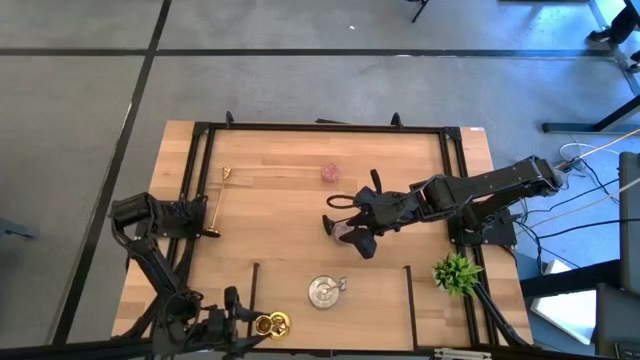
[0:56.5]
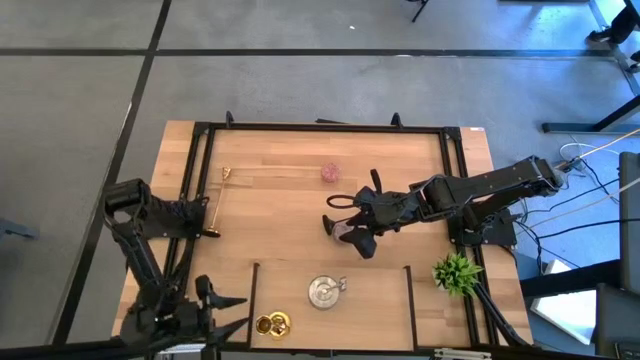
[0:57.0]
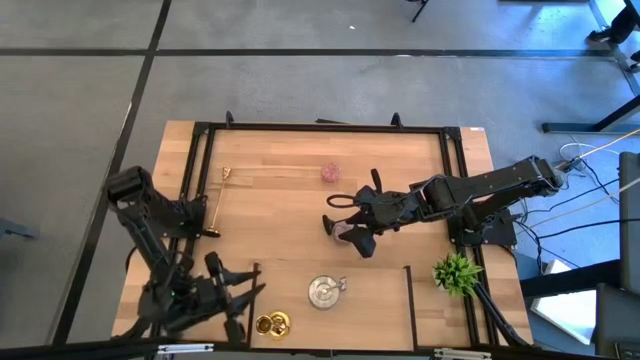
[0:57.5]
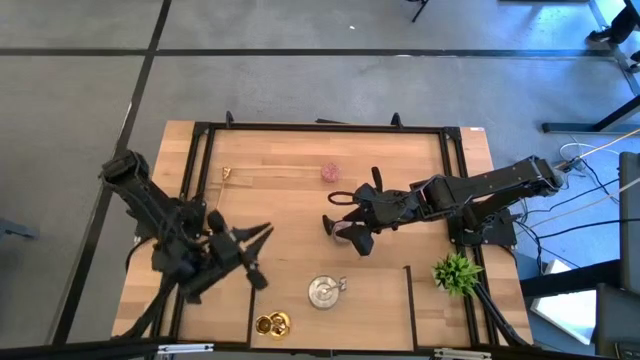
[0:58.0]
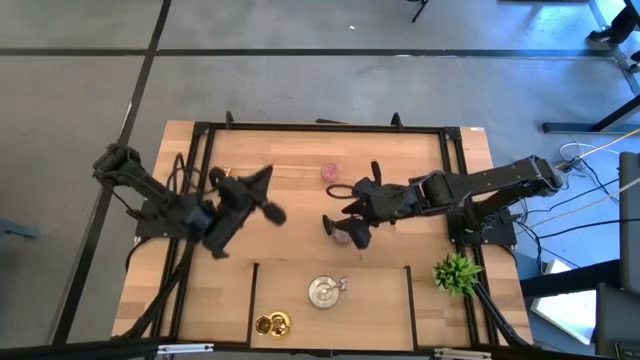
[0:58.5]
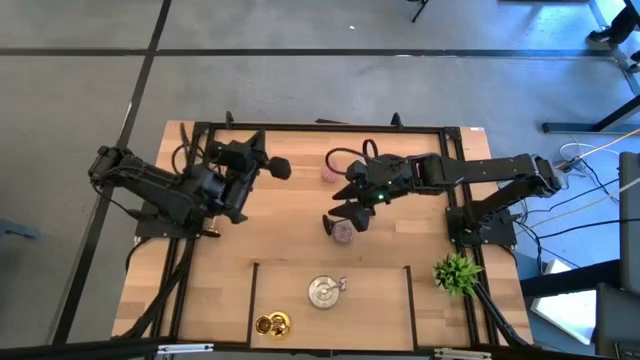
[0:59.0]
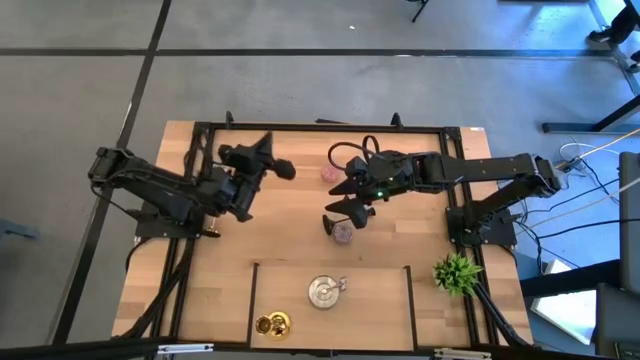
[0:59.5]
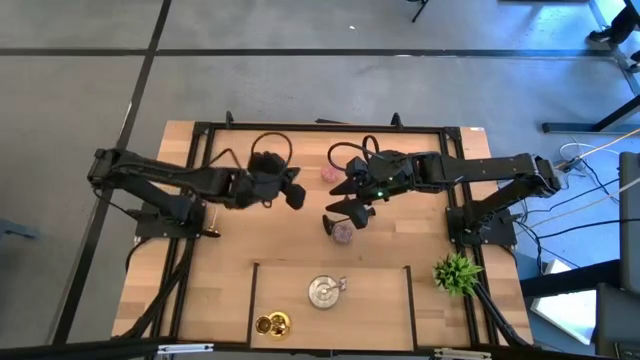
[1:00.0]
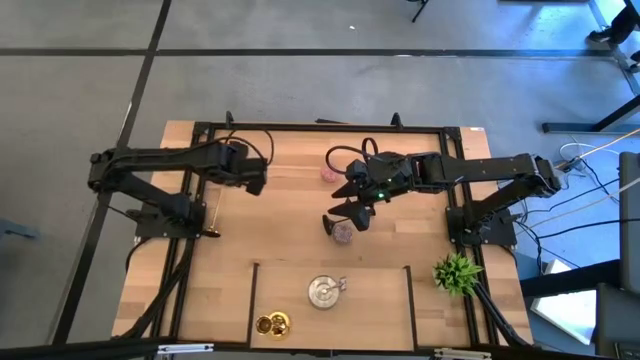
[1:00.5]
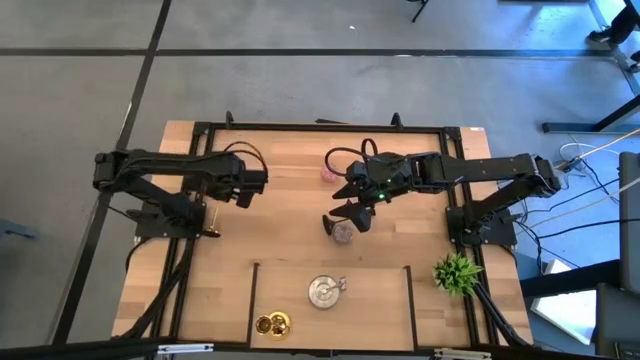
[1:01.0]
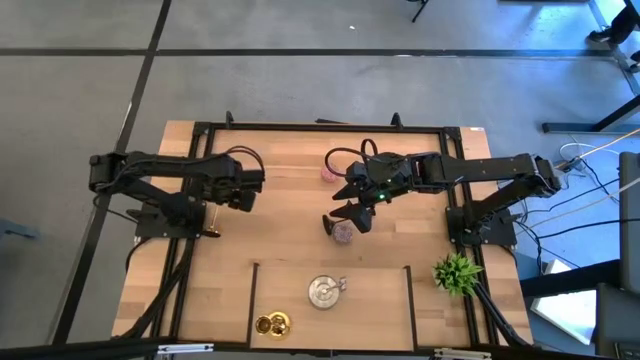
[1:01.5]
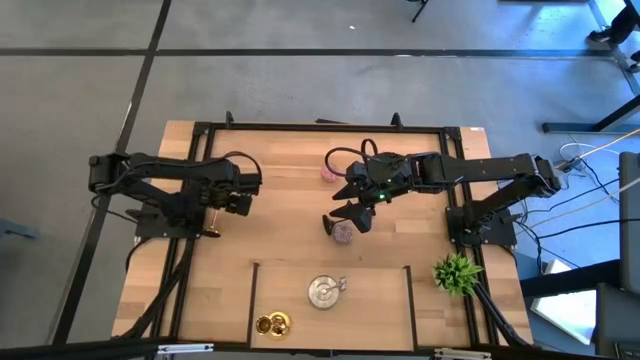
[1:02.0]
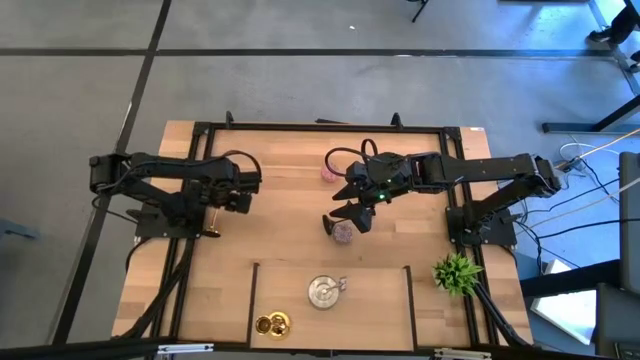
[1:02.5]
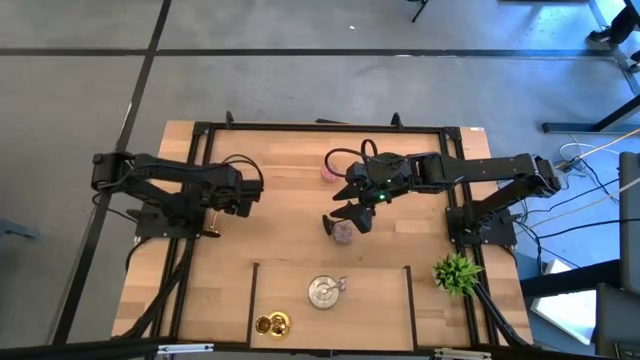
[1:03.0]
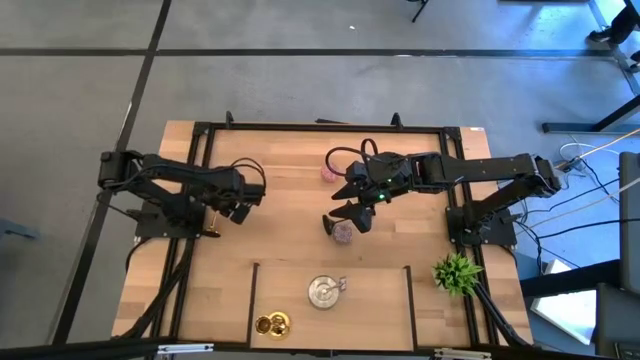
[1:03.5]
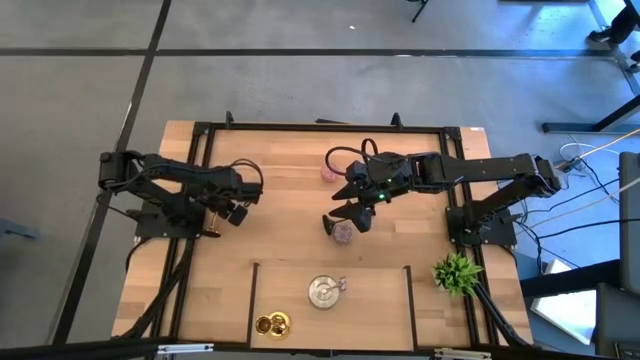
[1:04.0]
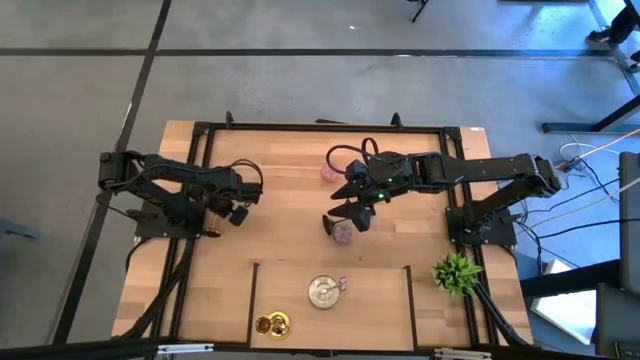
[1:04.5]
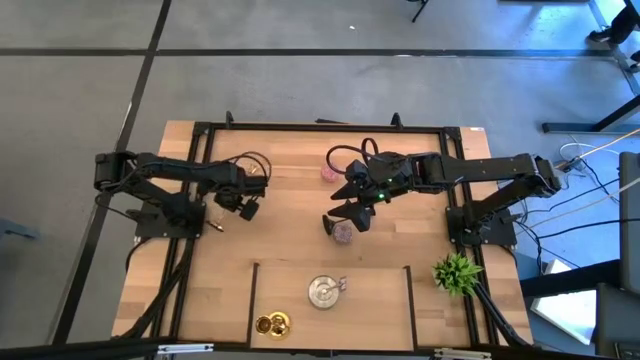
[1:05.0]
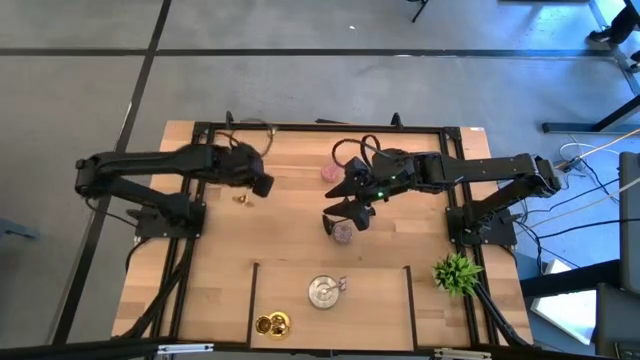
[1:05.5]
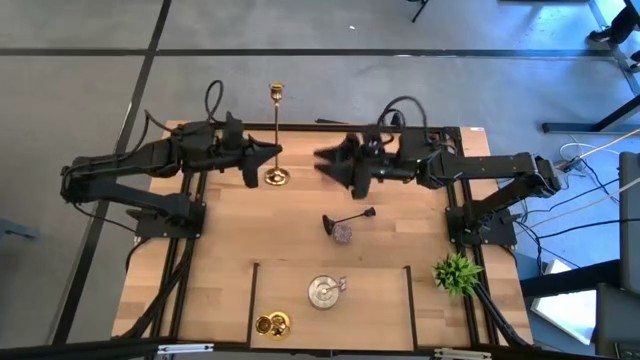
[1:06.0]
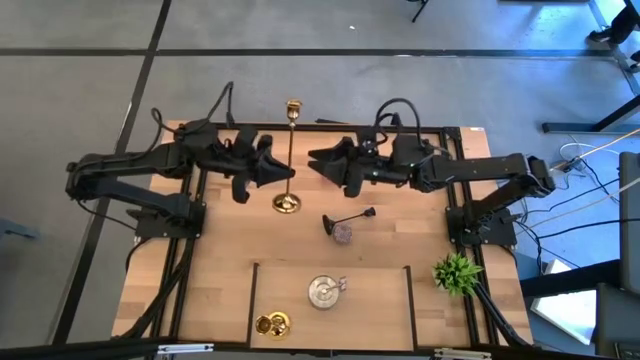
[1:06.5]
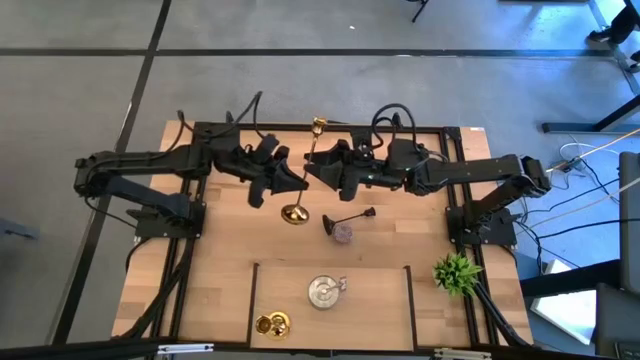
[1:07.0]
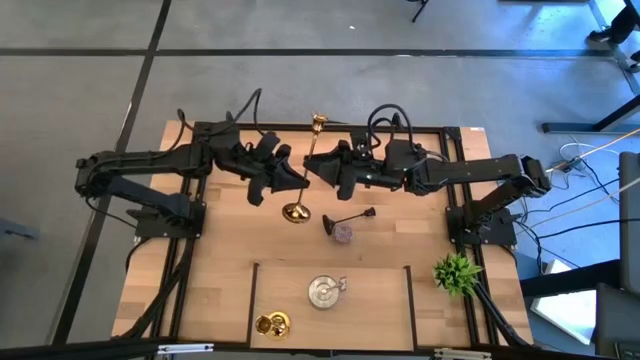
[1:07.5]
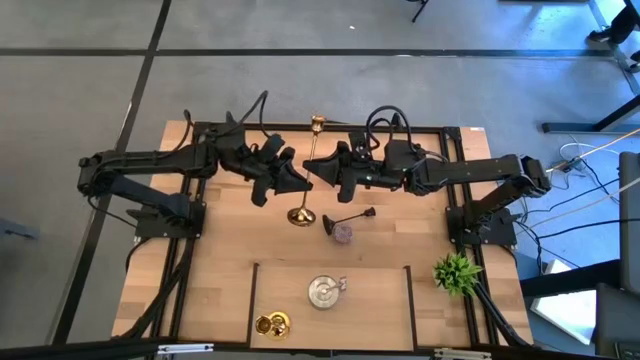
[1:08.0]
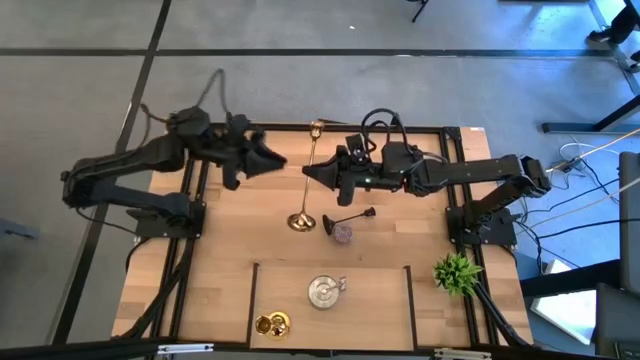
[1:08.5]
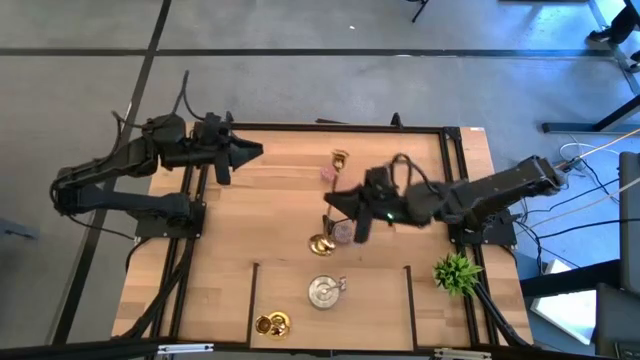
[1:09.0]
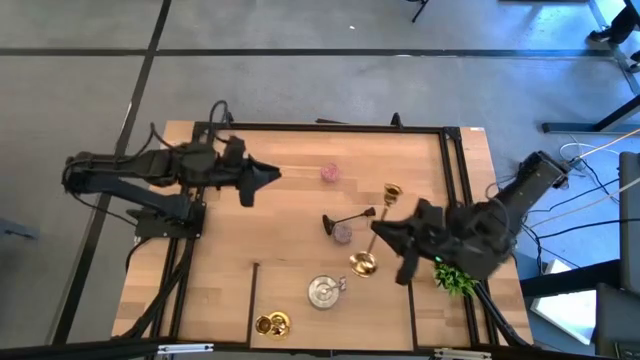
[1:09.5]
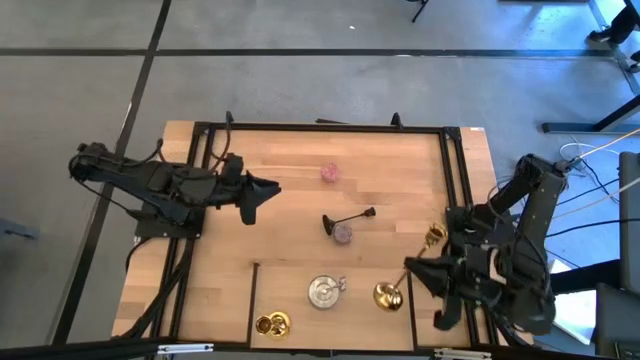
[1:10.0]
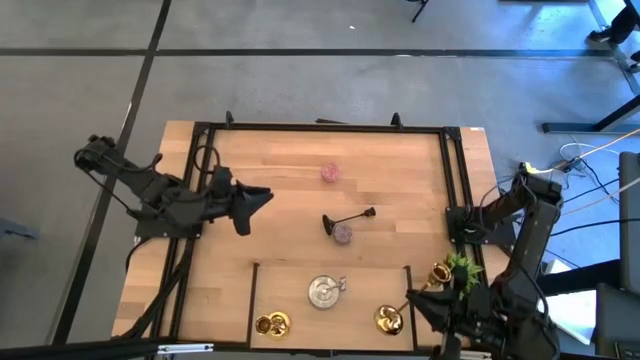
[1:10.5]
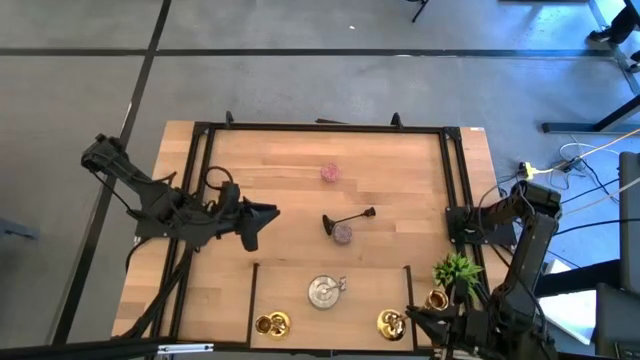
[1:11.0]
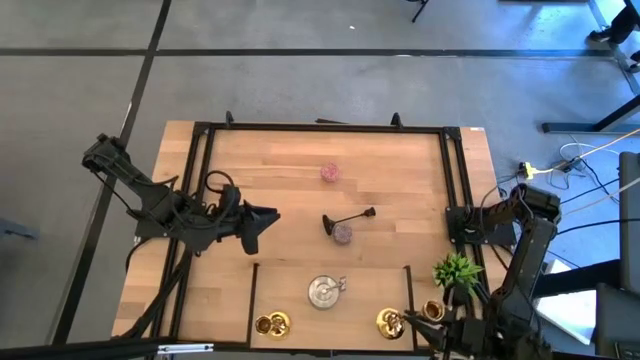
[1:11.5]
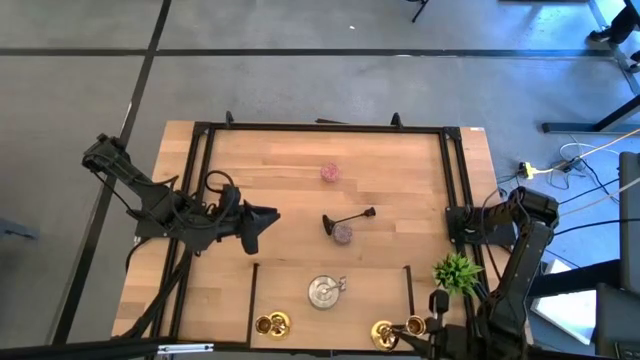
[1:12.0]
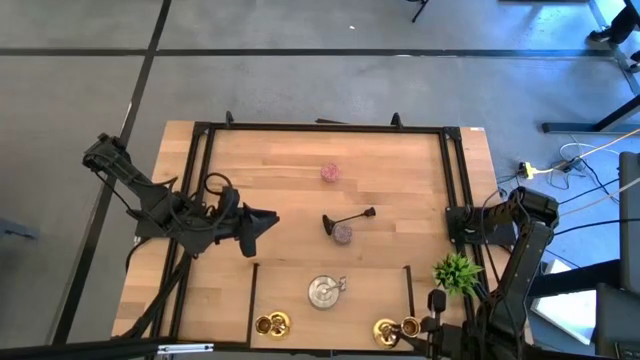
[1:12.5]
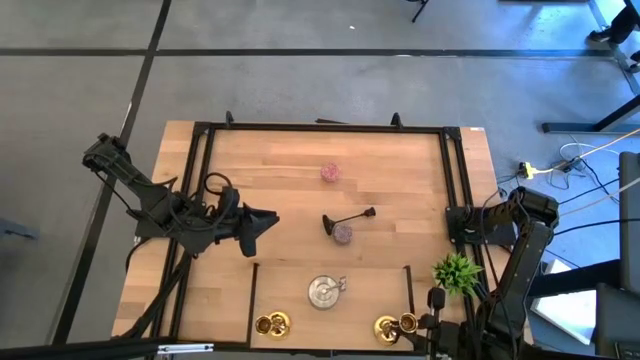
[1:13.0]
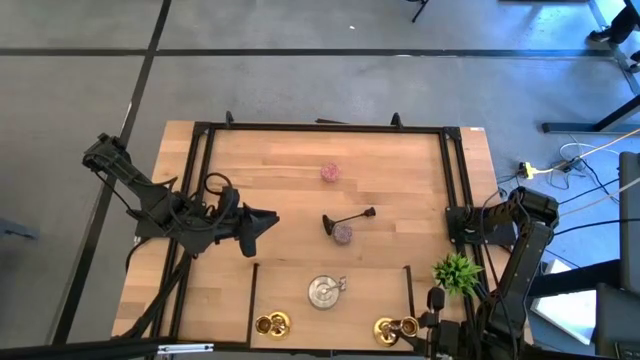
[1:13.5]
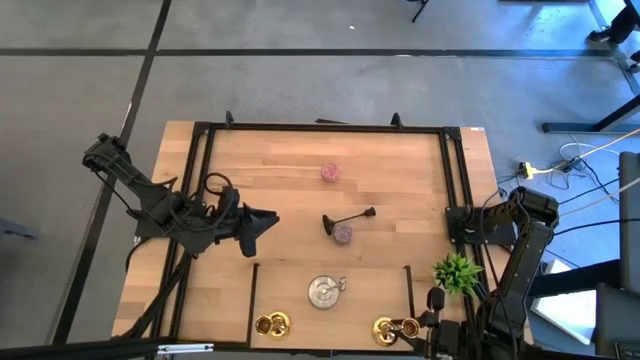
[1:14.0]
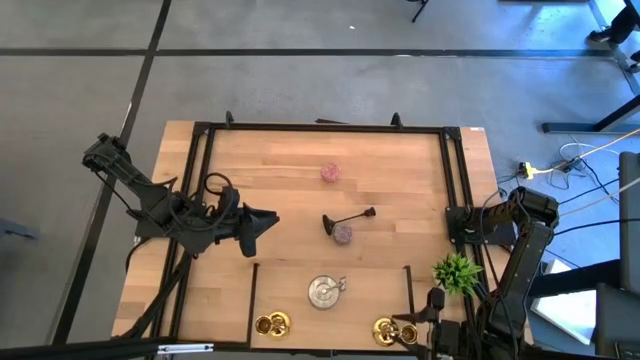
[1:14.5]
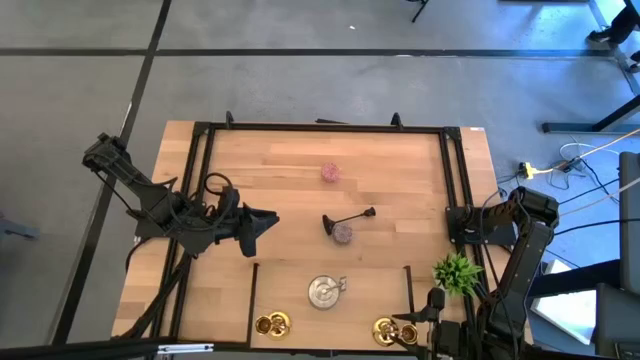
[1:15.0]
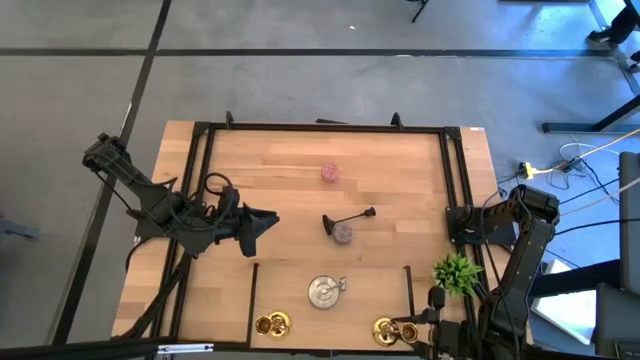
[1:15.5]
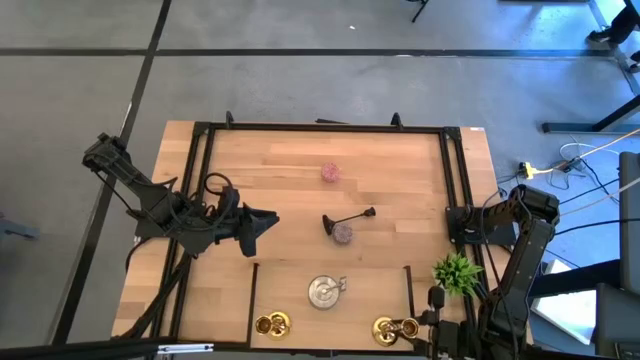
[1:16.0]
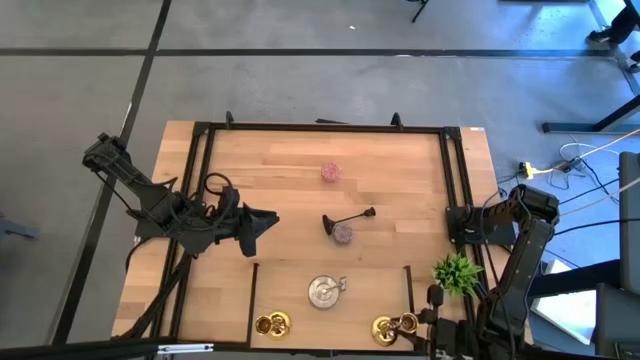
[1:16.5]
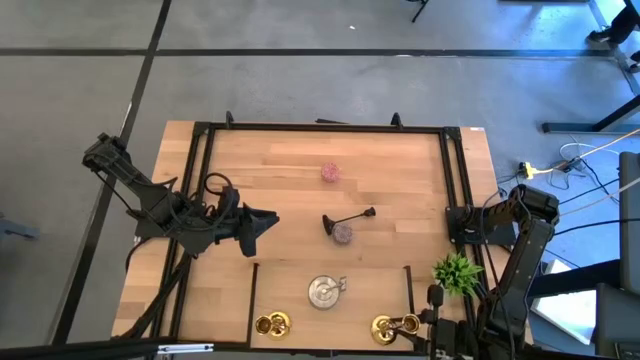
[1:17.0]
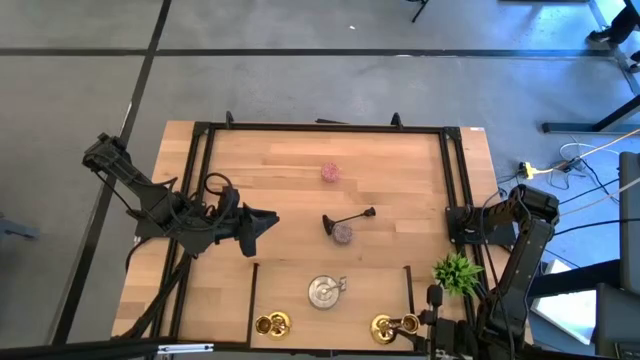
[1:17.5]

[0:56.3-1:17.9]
Task: Pick & Place candle stick holders
Put the gold candle holder on the shelf

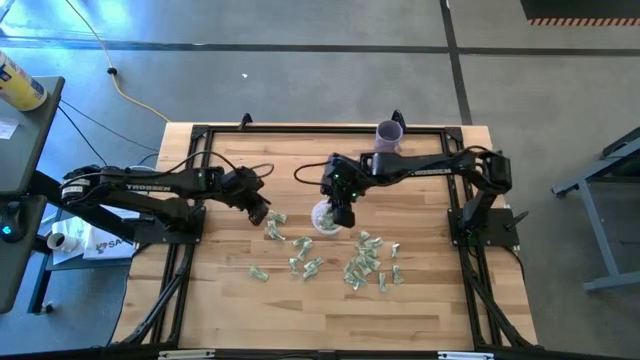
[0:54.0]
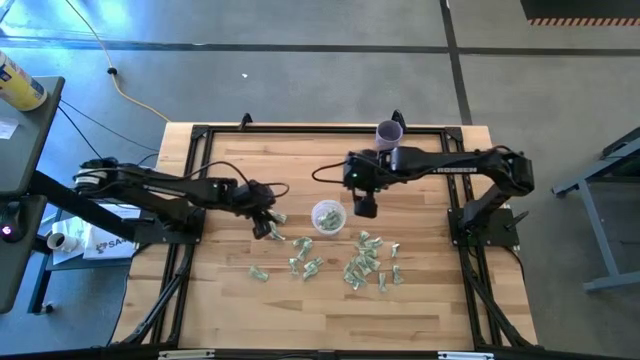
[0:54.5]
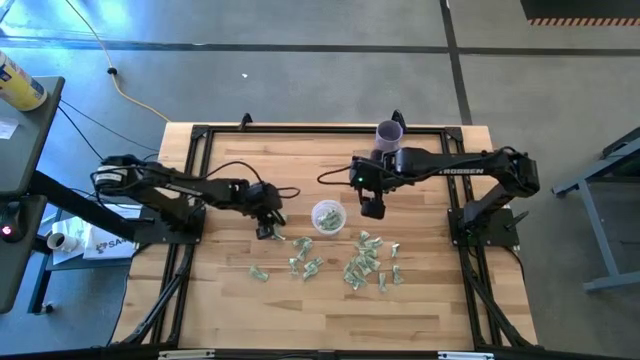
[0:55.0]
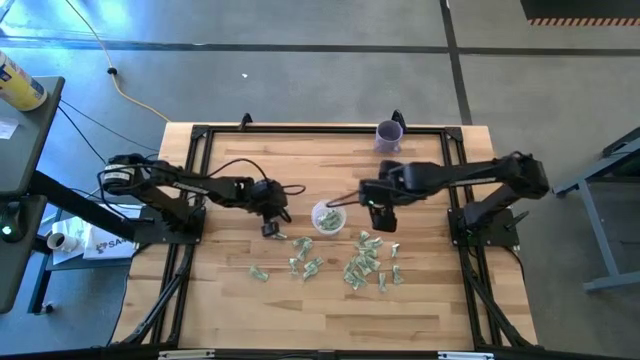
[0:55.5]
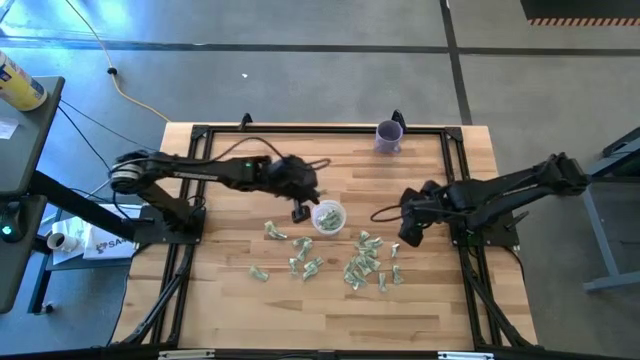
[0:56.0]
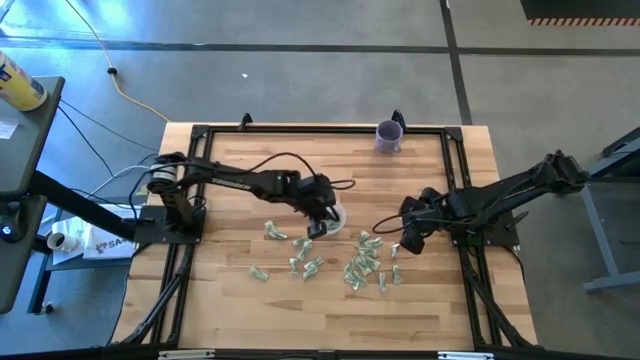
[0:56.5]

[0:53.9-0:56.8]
Task: Pick and place Stevia / Truvia into bins
Put the green stevia packet into the transparent bin
